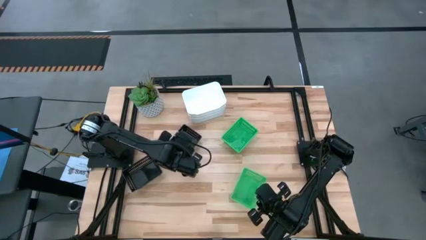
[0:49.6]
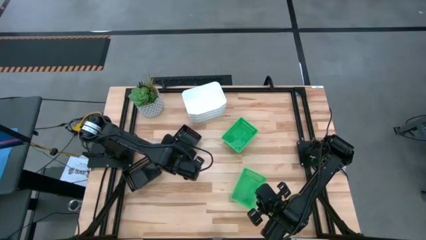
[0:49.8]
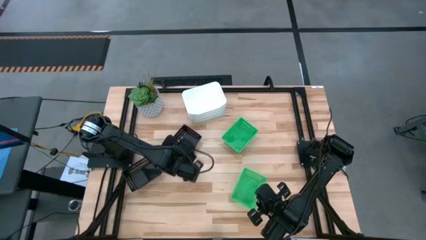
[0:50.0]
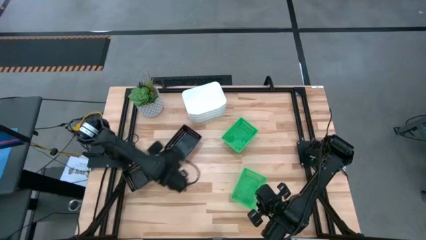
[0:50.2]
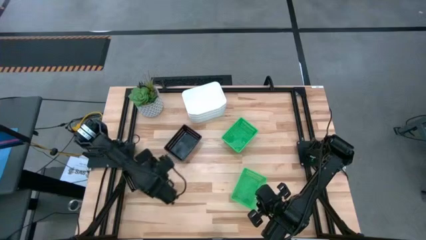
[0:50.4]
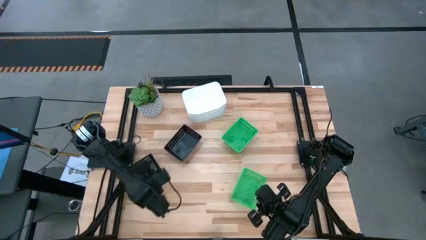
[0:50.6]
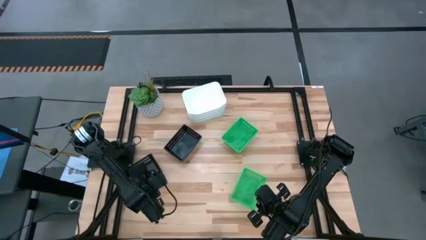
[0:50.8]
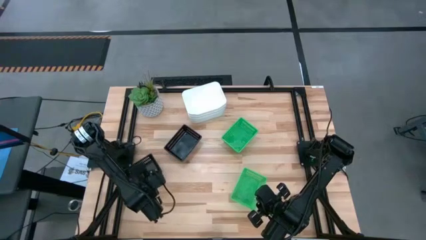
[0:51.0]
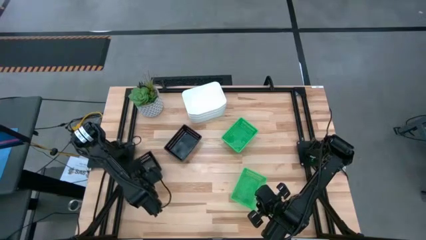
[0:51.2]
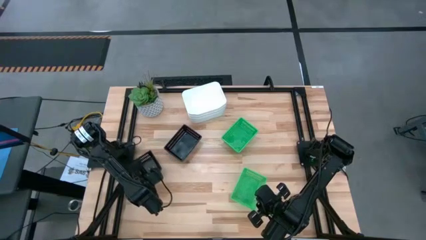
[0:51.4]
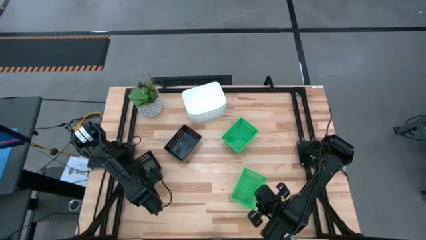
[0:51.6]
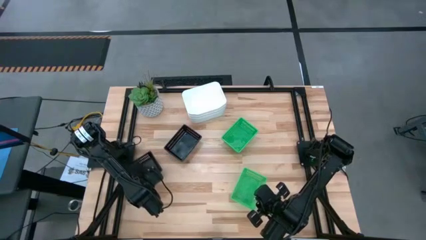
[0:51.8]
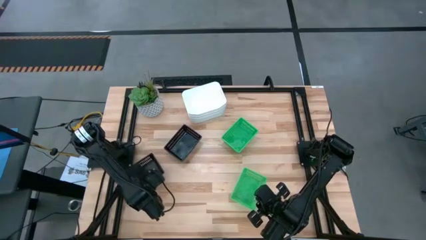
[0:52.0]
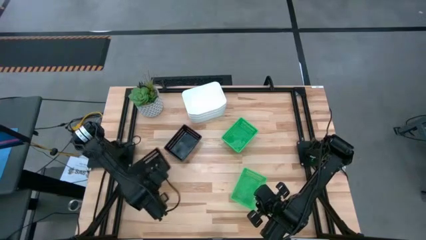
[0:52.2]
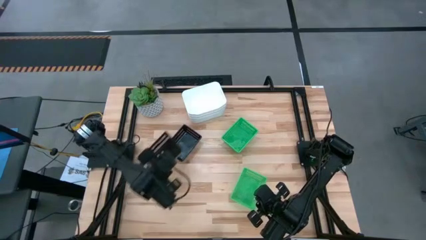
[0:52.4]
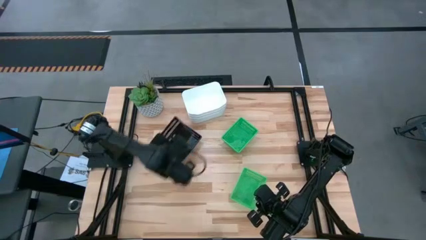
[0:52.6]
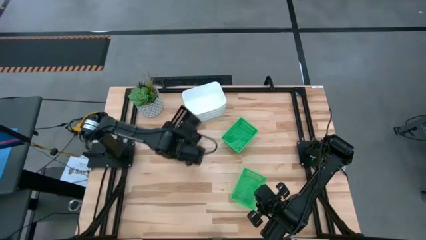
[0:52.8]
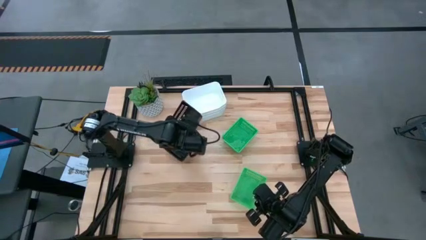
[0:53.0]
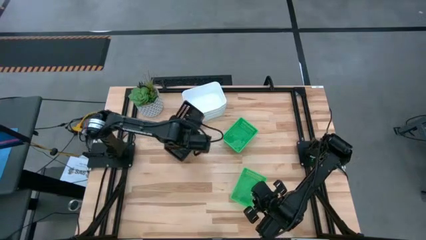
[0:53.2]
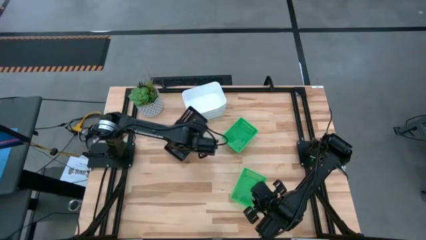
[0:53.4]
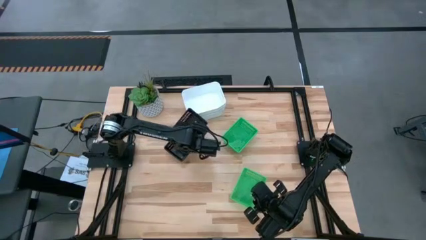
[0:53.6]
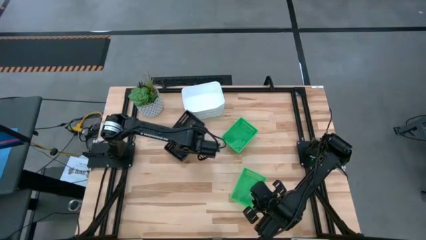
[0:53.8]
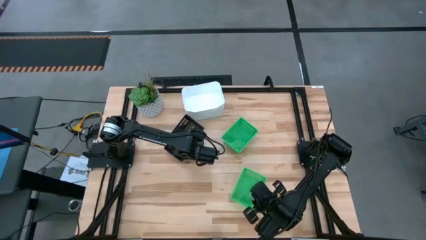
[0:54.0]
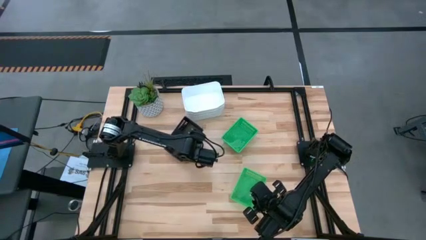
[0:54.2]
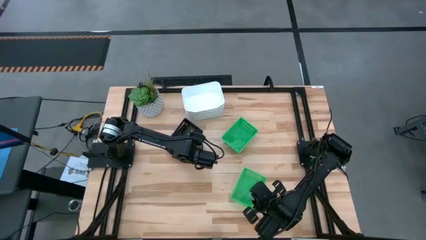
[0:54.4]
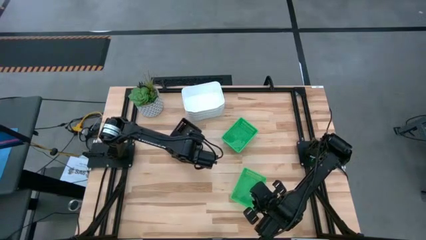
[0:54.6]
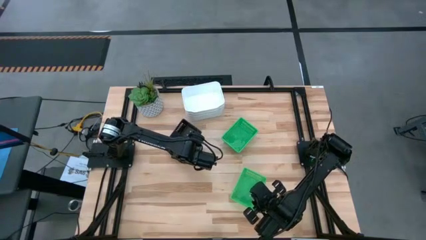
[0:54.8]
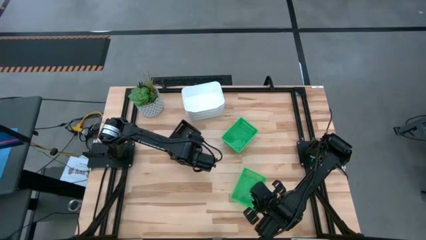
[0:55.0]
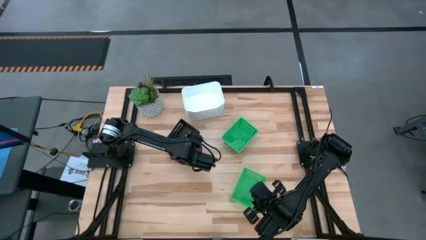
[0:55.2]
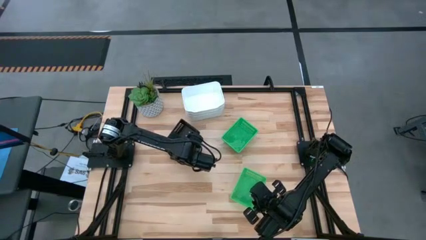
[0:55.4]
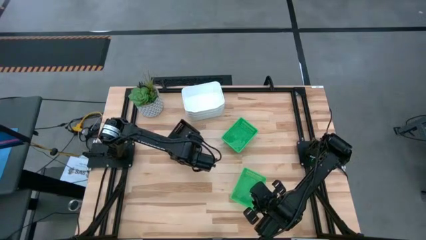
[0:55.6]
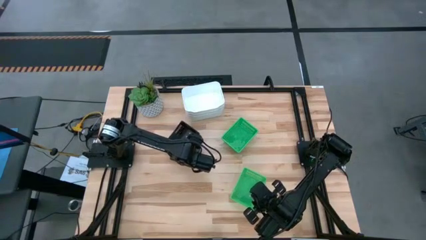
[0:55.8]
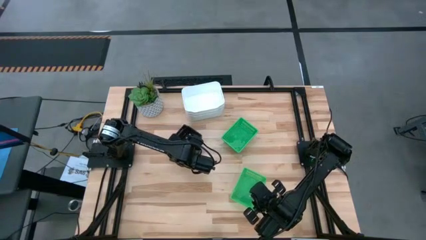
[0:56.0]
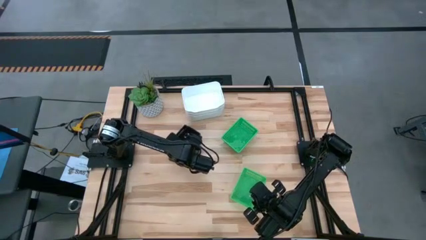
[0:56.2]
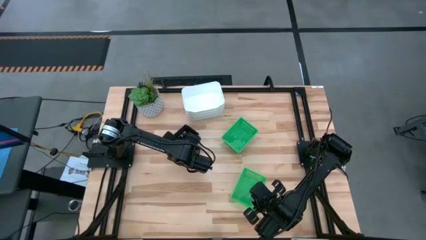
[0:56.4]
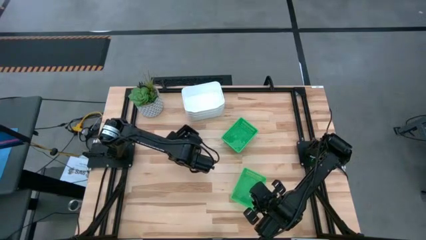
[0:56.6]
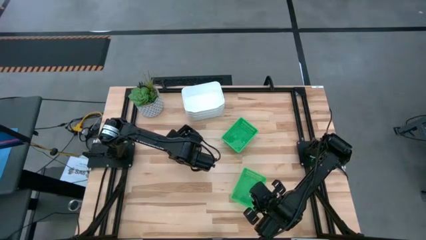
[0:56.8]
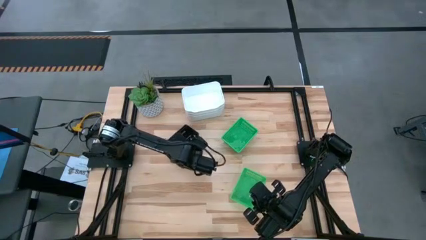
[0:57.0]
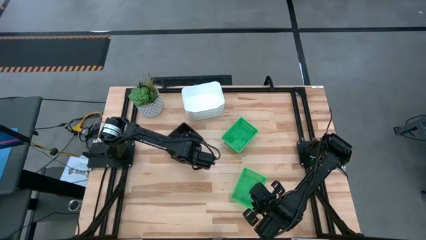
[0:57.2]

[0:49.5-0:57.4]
Stack the bottom black bin on top of the top black bin

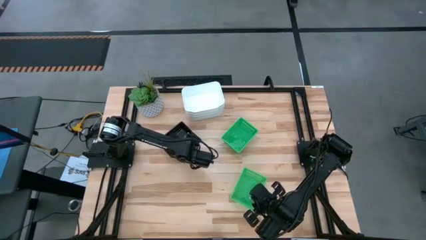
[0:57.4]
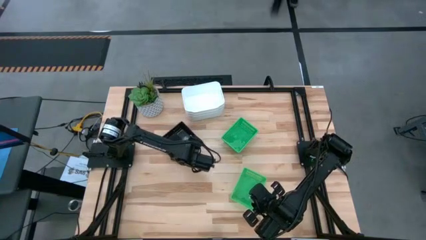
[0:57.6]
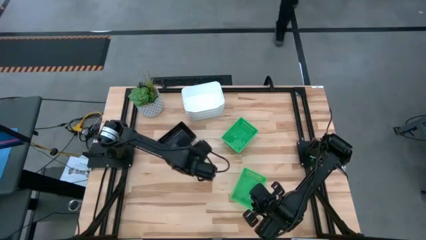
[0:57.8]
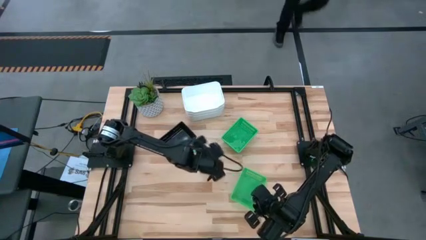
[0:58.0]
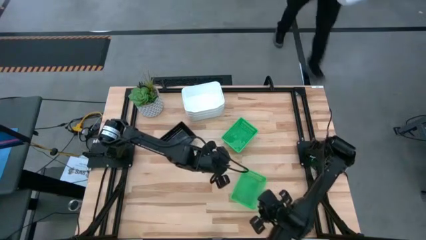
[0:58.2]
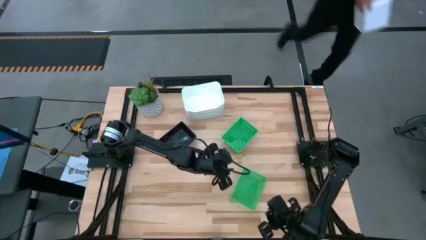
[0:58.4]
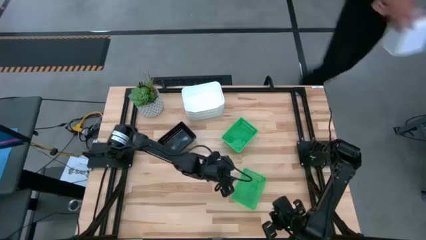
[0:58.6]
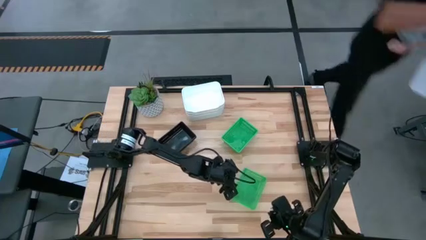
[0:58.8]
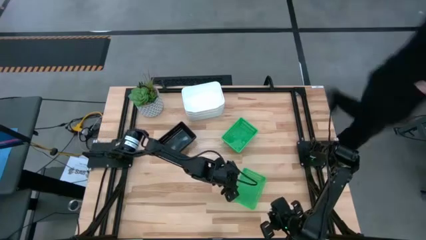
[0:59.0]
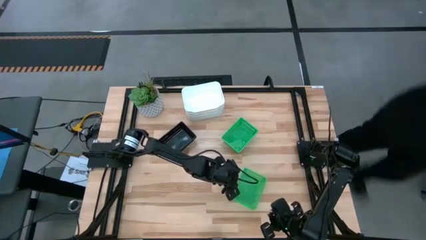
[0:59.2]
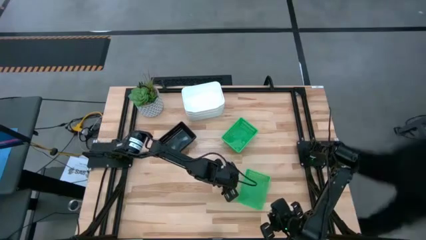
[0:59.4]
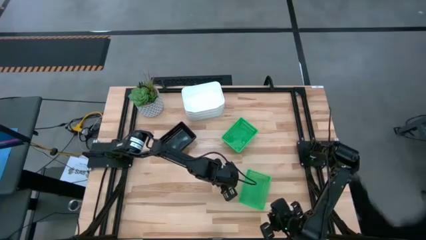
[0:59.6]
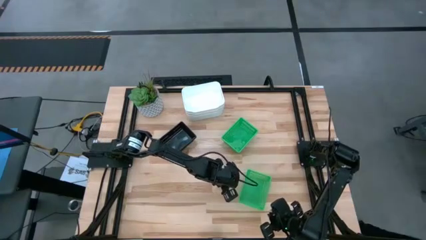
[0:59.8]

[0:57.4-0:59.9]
Stack the bottom green bin on top of the top green bin

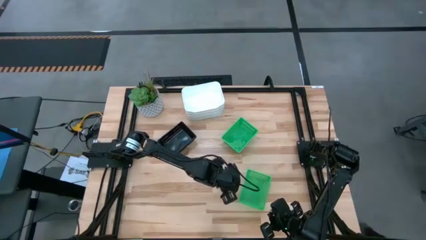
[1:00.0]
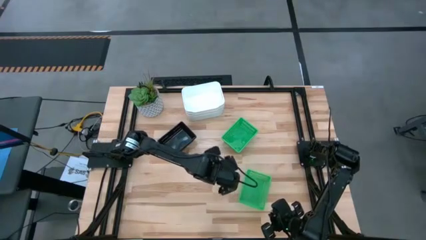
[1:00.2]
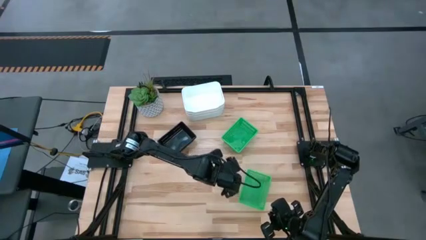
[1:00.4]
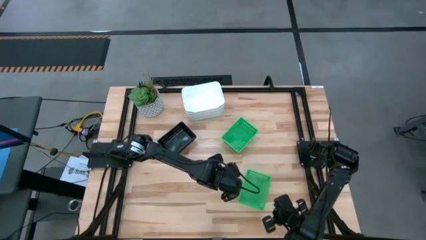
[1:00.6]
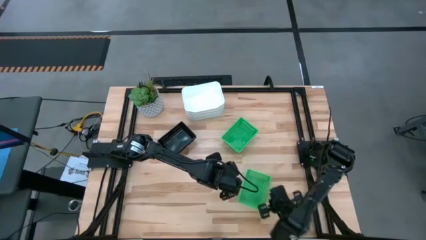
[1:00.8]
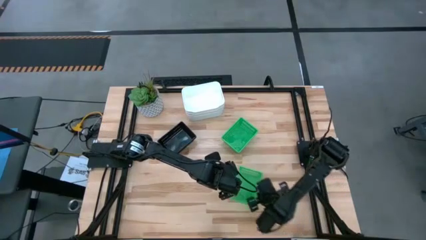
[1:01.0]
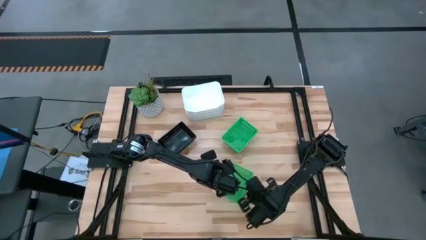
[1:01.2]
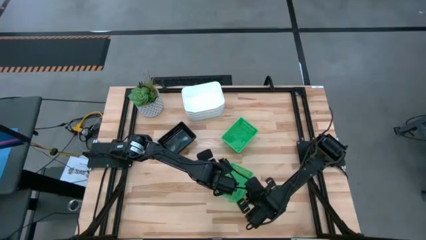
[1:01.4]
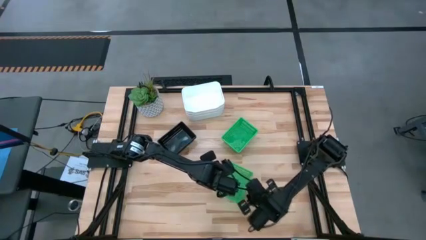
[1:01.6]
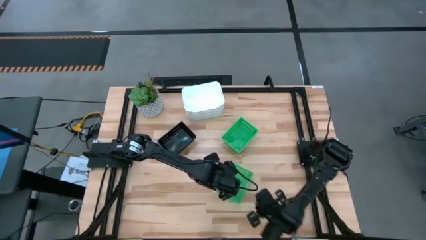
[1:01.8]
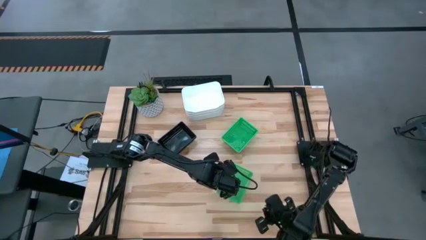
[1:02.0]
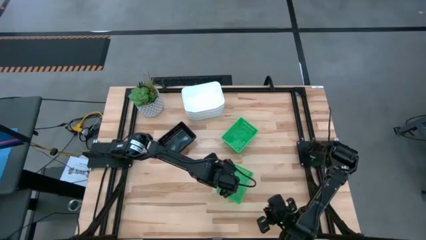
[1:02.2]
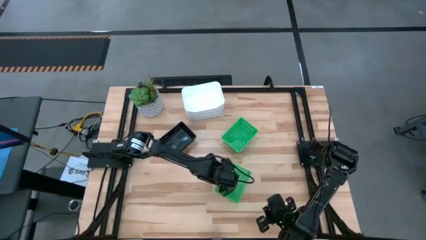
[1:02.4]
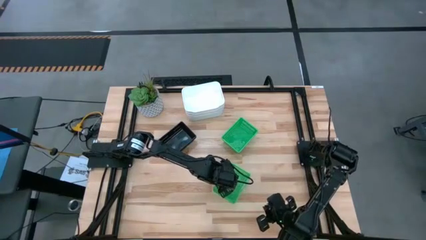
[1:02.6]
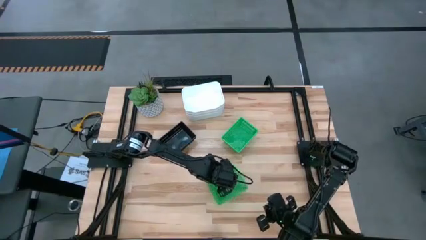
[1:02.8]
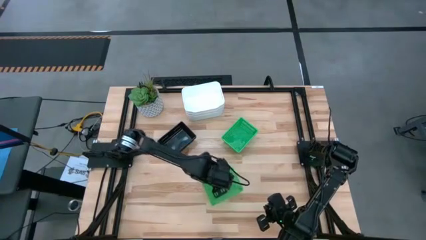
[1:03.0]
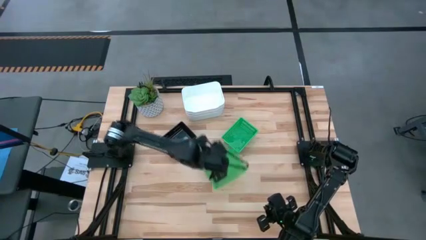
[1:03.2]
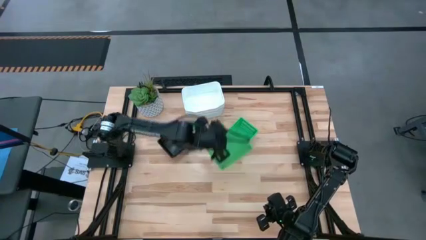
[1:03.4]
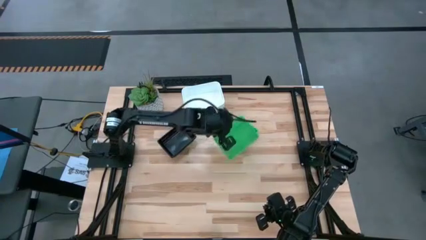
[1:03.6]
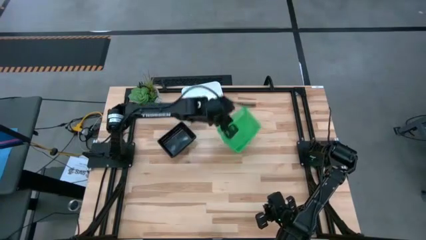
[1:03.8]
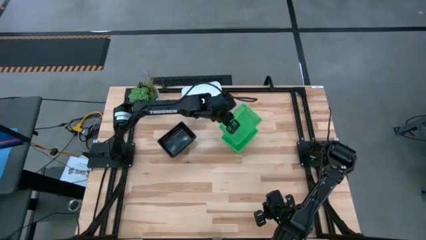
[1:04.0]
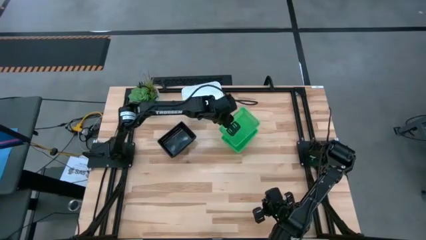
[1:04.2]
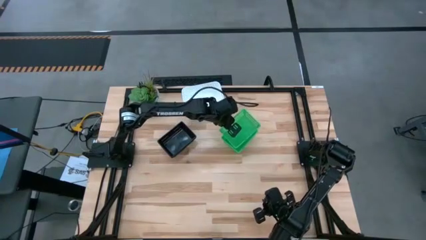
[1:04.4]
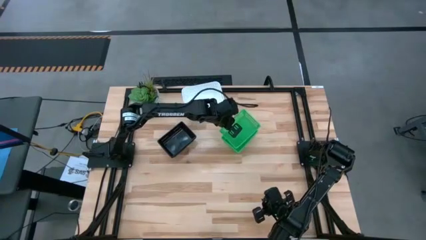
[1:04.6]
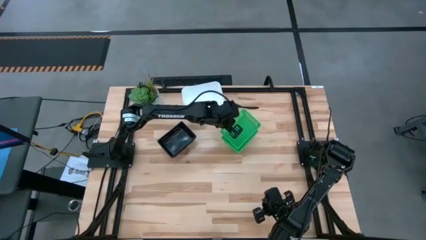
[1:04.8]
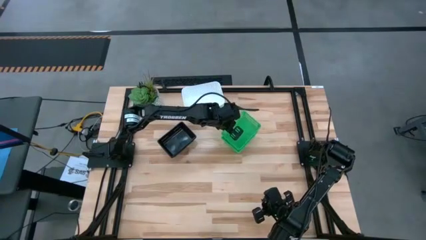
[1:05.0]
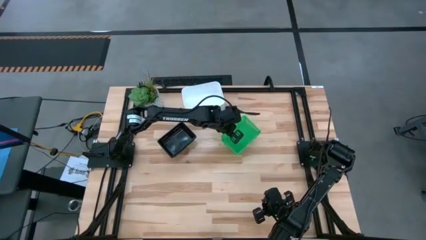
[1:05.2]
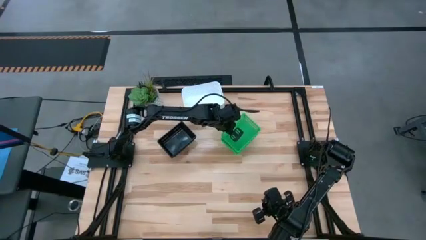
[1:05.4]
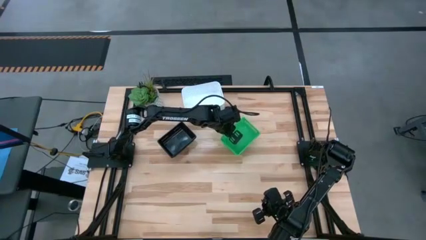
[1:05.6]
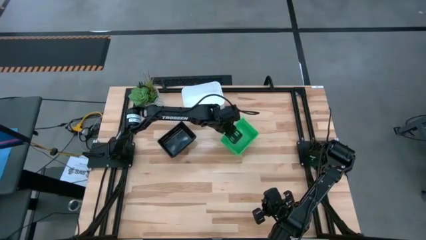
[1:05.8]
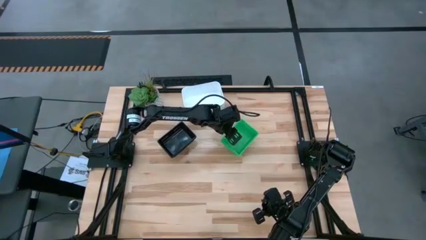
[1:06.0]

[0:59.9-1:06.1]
Stack the bottom green bin on top of the top green bin
